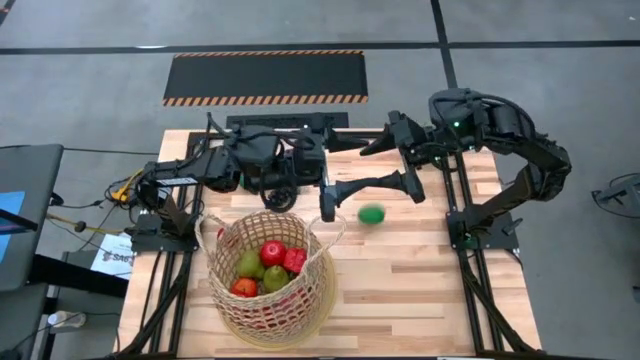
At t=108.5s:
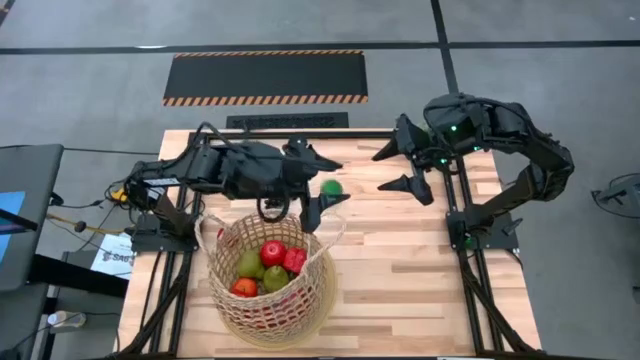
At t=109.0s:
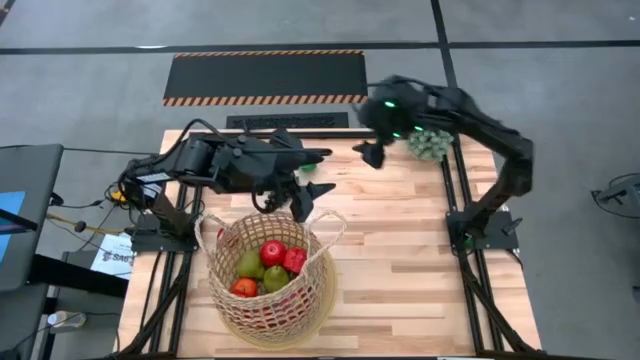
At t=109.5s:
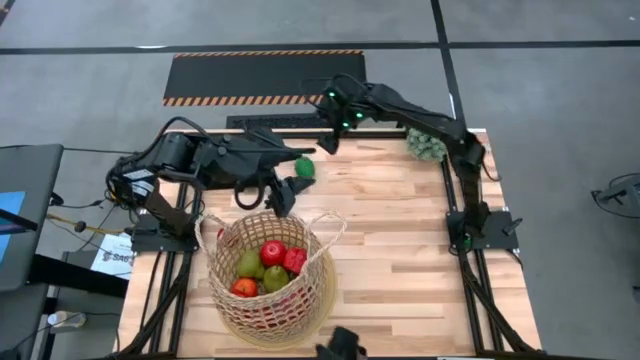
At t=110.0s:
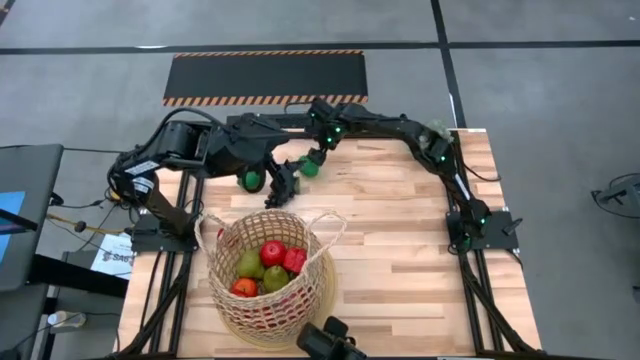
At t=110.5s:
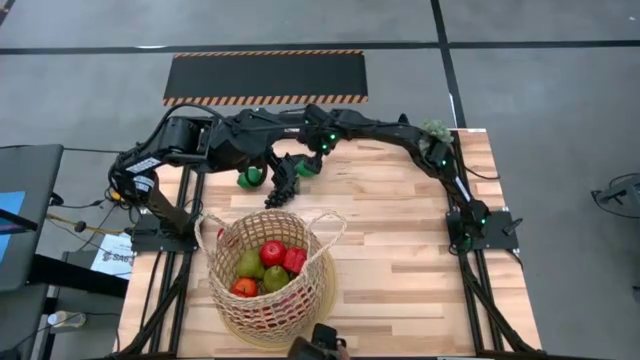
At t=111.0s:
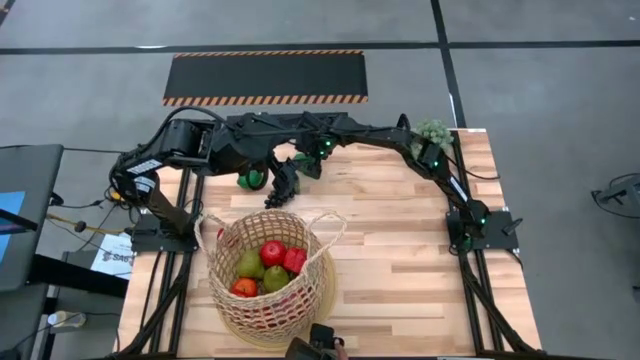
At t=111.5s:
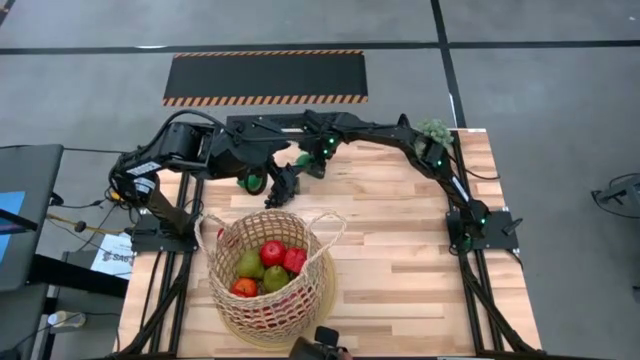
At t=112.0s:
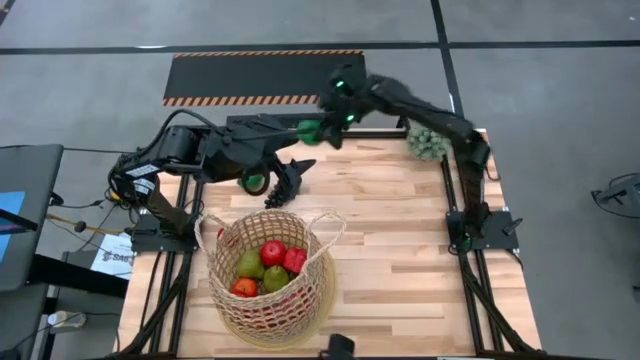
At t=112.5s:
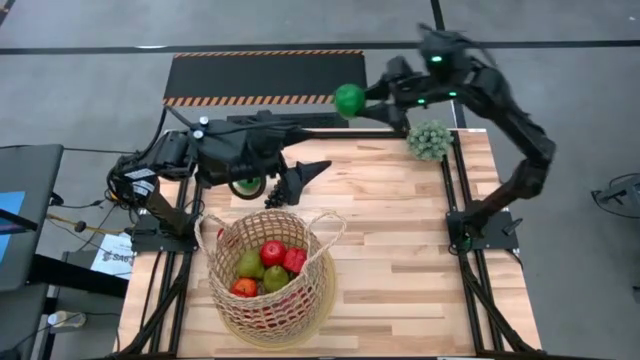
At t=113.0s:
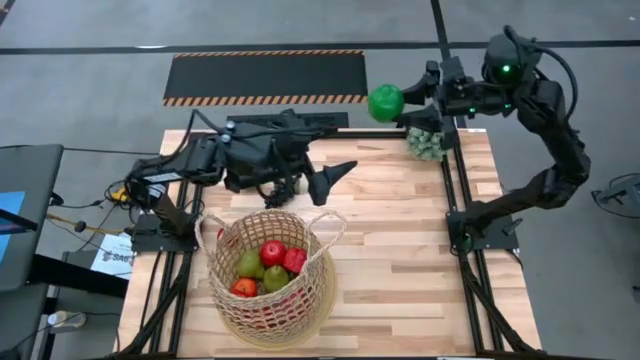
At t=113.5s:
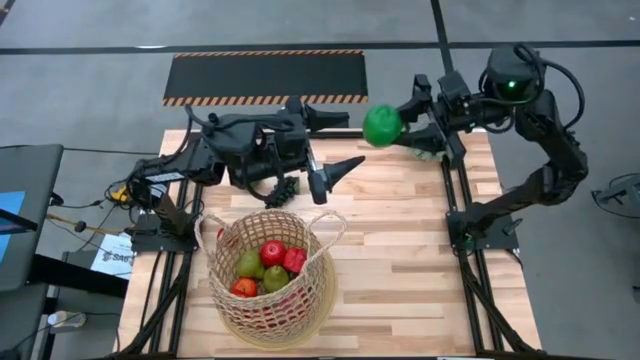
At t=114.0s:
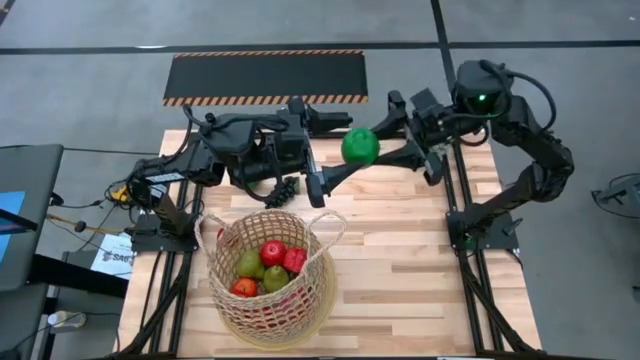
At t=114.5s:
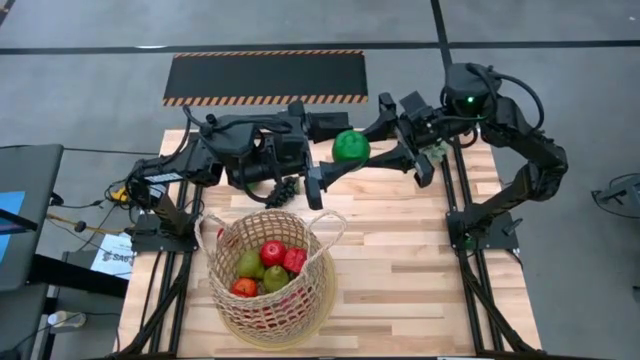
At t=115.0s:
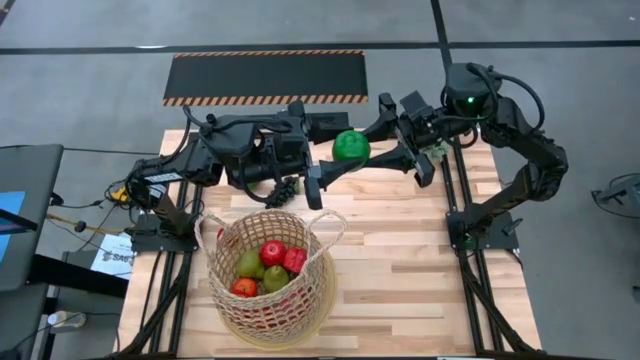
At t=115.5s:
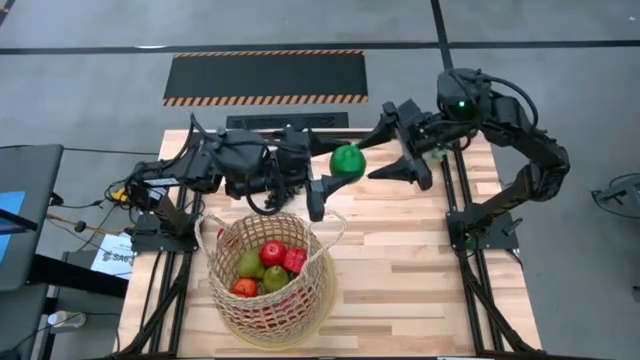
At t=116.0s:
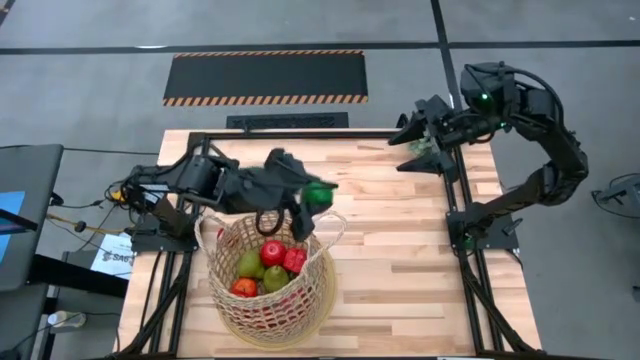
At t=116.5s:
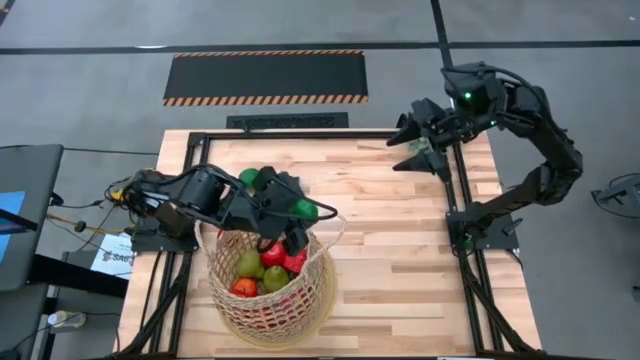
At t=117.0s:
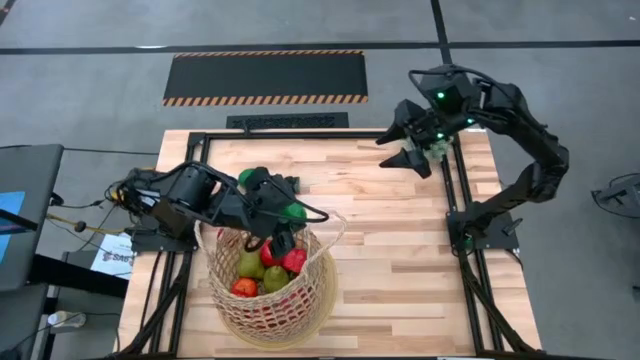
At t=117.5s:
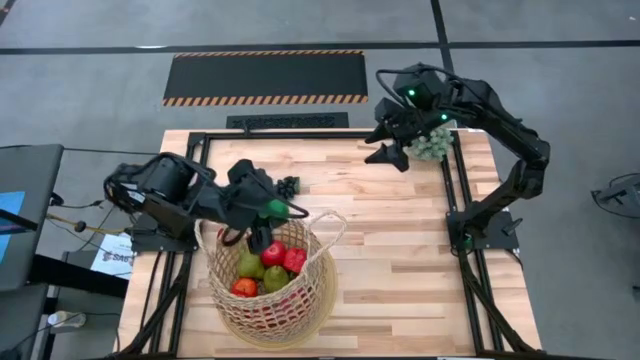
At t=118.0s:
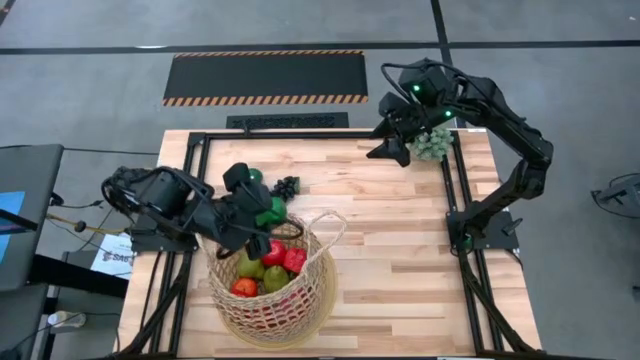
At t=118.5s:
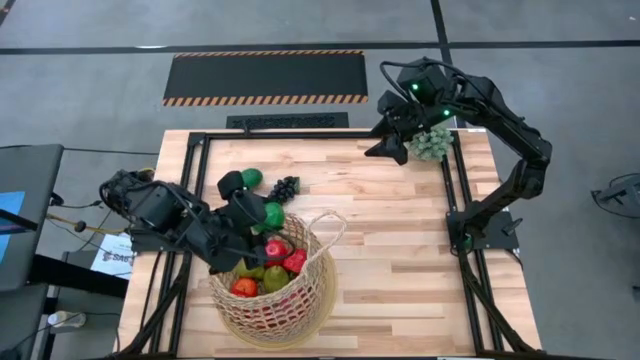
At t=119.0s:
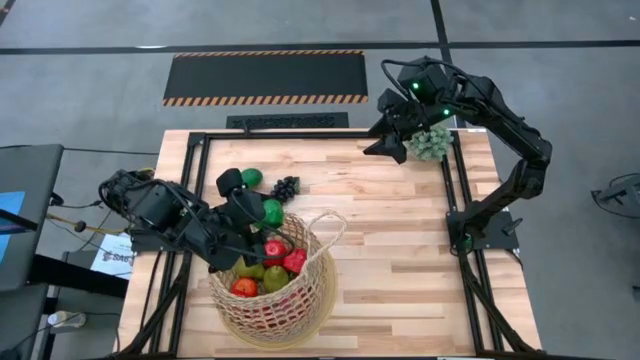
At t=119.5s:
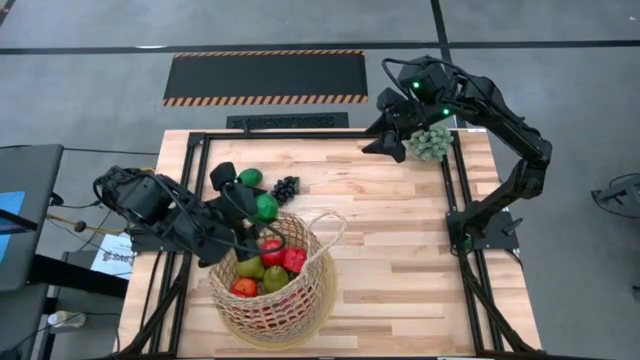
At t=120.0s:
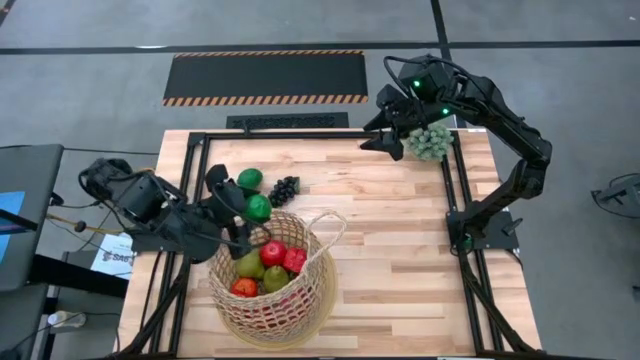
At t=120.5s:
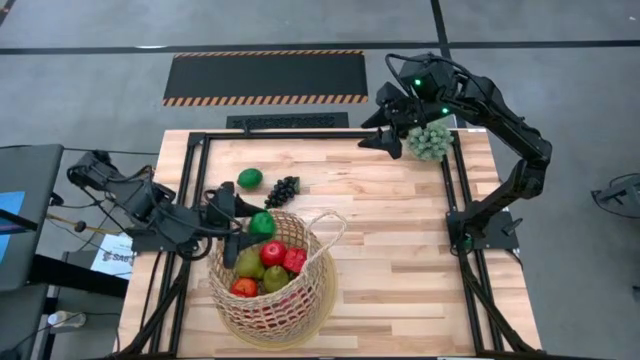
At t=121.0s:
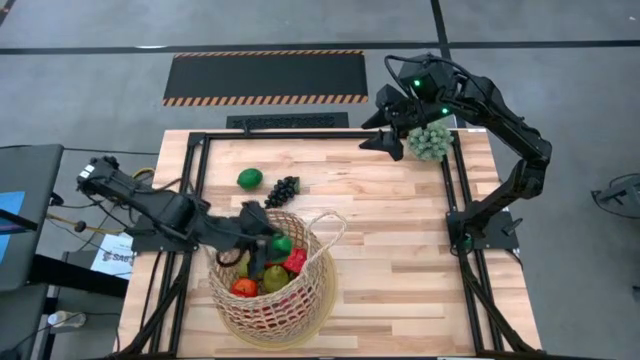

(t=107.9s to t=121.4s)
Task: Build produce basket
Put the lime into the basket

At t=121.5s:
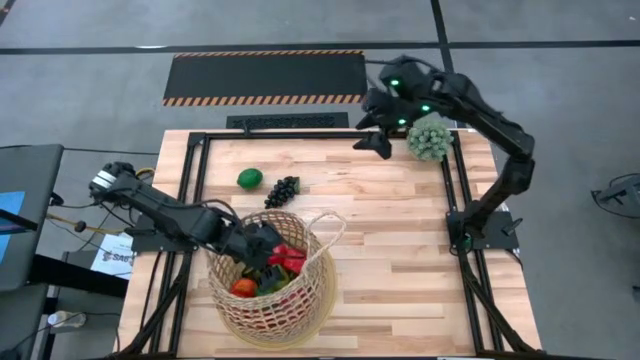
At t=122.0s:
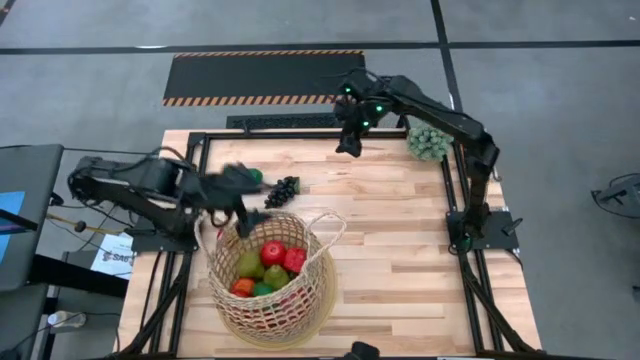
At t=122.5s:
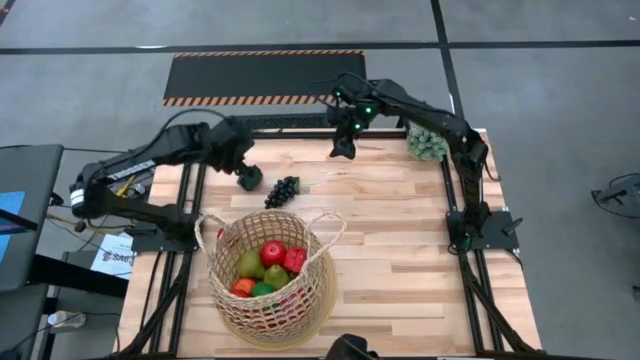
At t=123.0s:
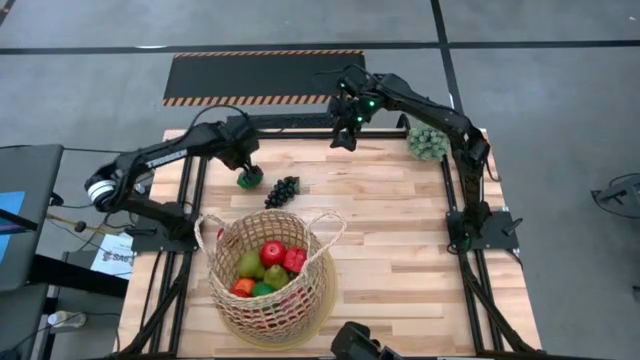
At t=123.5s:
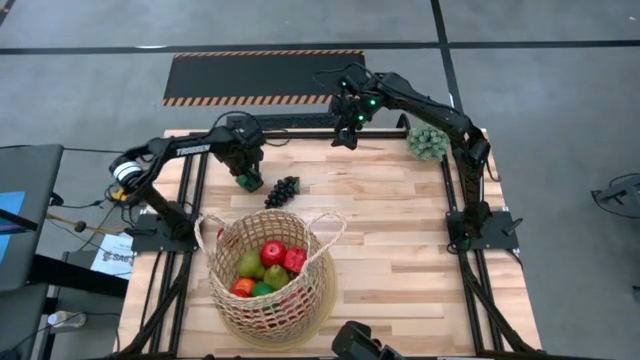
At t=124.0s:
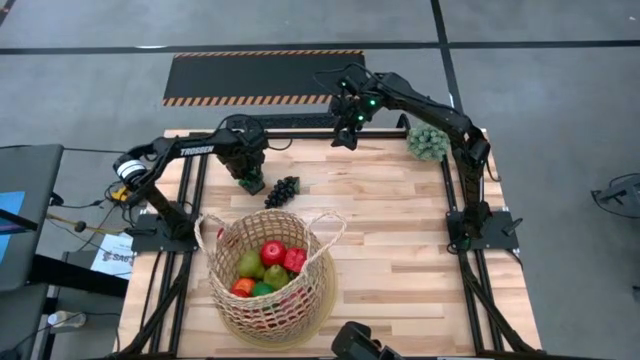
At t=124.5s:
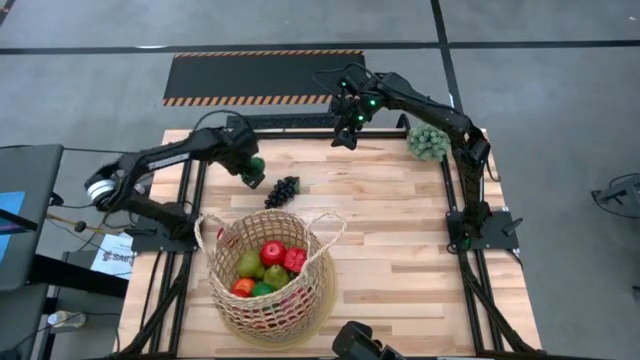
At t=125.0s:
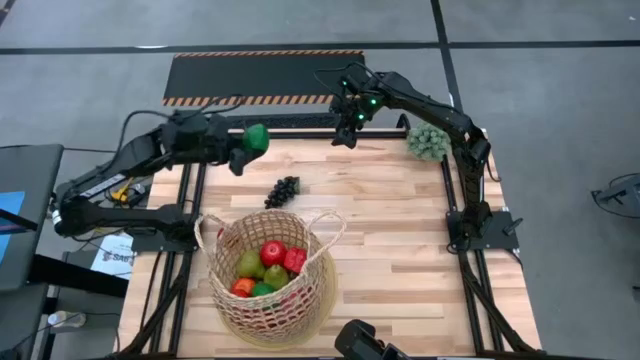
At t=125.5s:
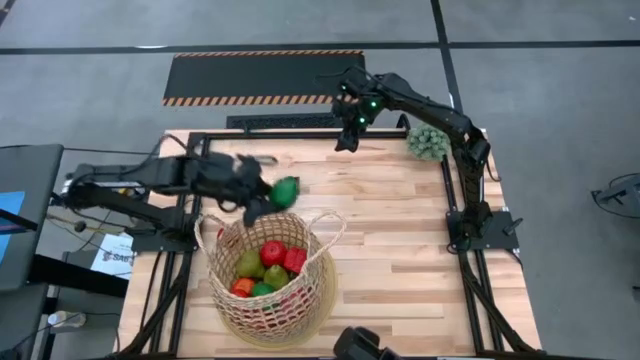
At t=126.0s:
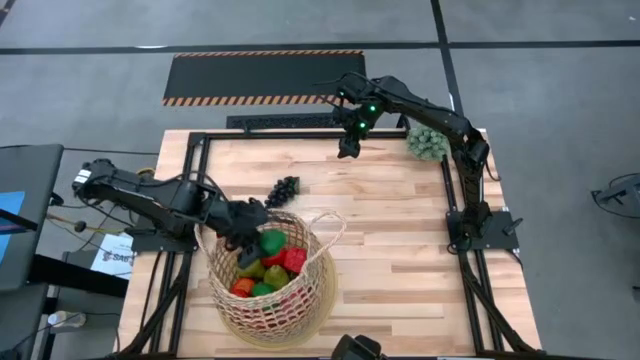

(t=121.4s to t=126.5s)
Put the lime into the basket

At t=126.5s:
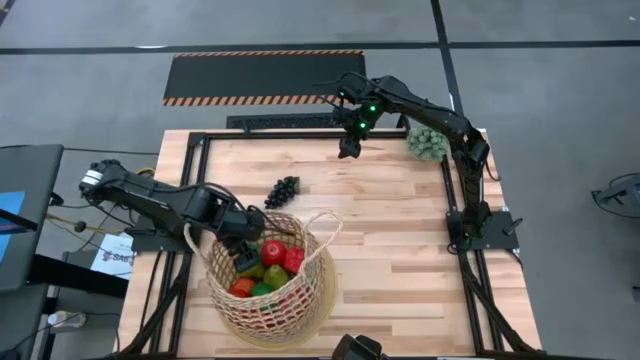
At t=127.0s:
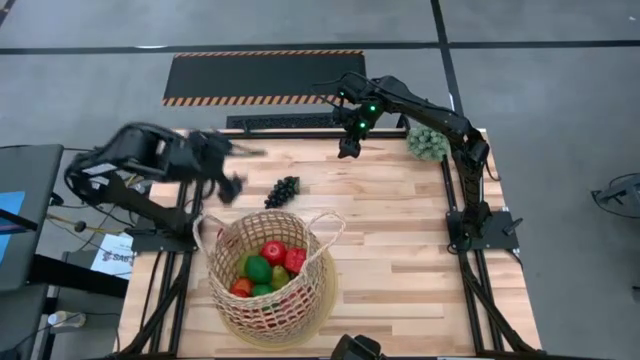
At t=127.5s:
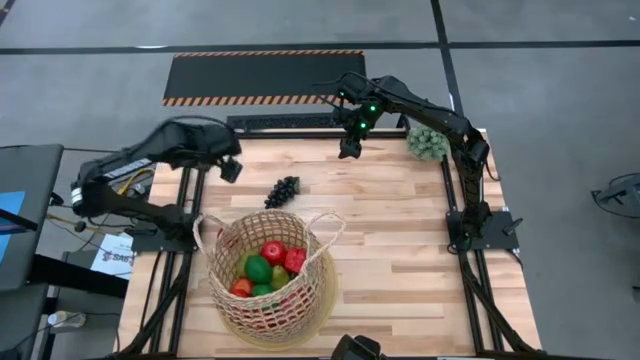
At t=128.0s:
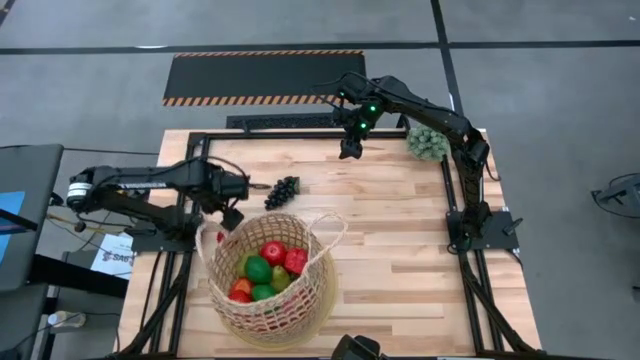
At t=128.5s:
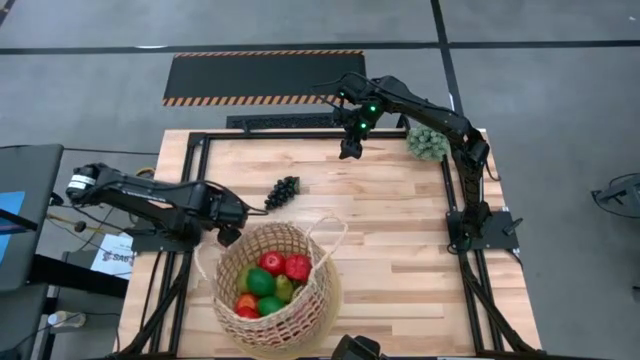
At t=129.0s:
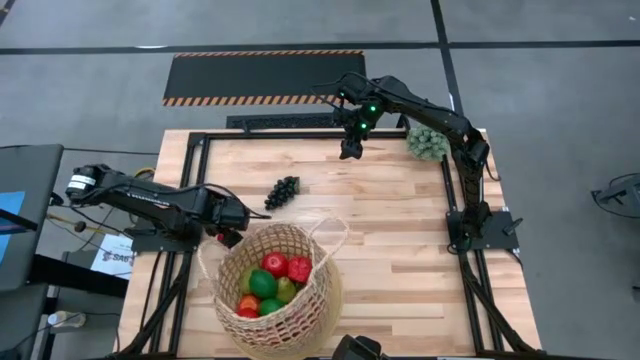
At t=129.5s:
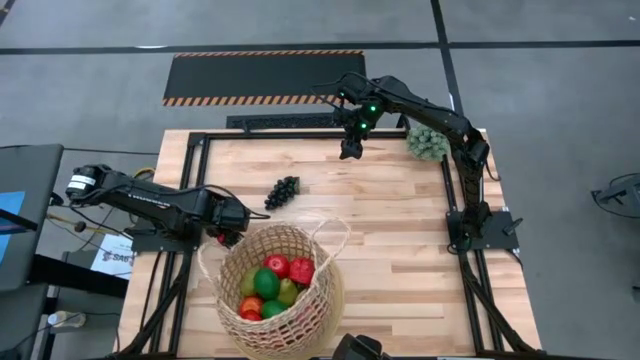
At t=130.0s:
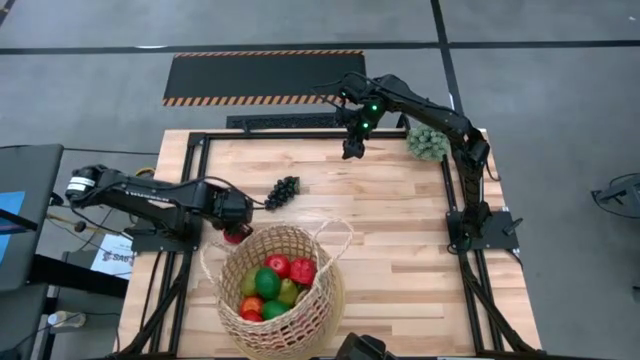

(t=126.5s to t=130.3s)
Put the tomato into the basket
